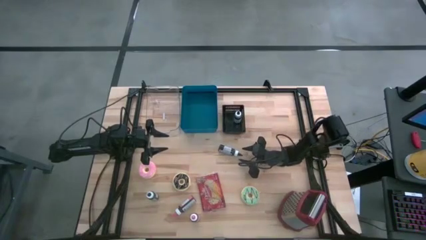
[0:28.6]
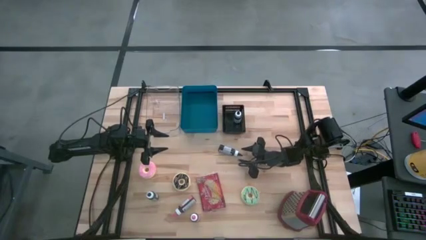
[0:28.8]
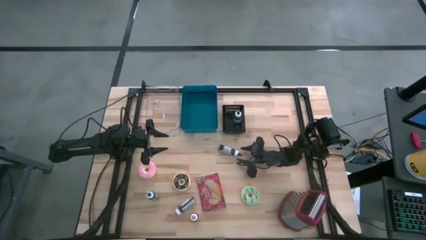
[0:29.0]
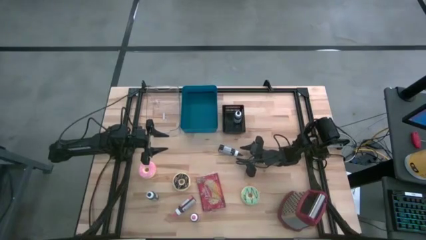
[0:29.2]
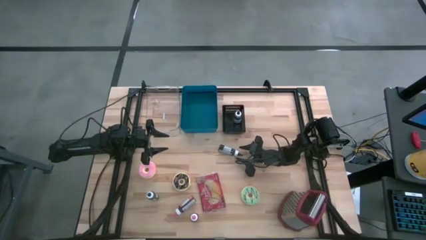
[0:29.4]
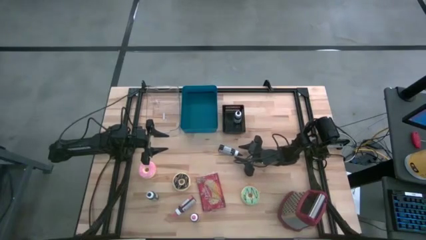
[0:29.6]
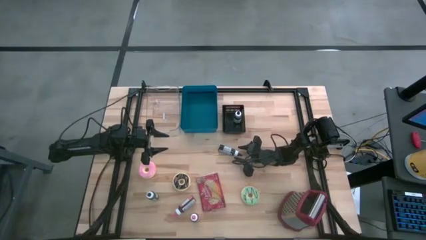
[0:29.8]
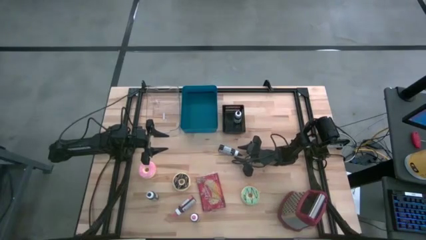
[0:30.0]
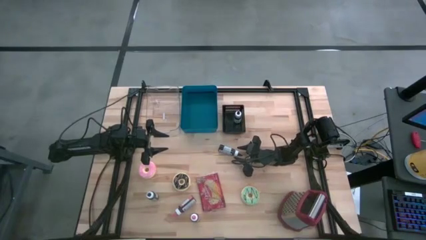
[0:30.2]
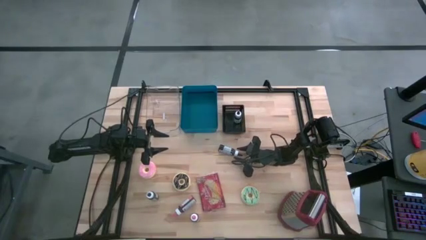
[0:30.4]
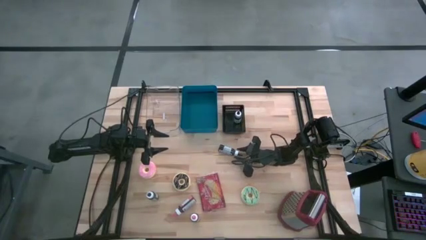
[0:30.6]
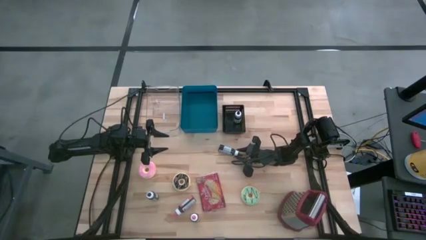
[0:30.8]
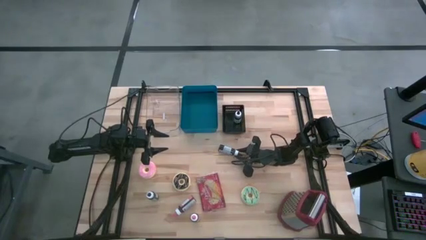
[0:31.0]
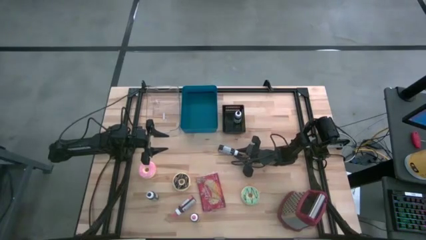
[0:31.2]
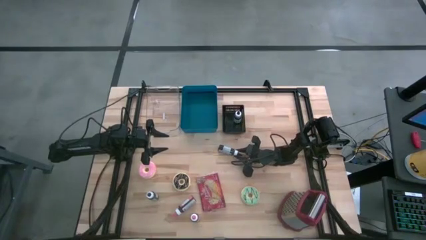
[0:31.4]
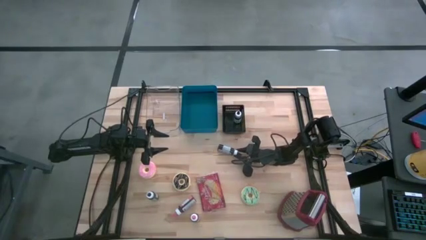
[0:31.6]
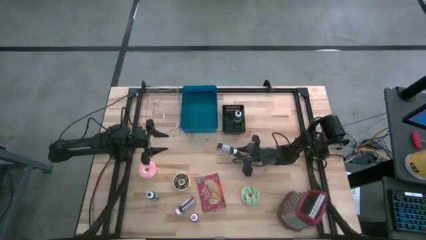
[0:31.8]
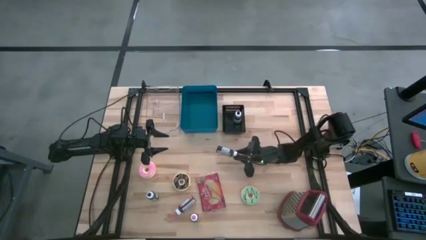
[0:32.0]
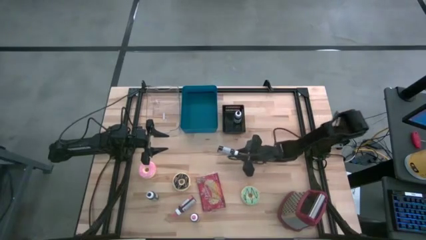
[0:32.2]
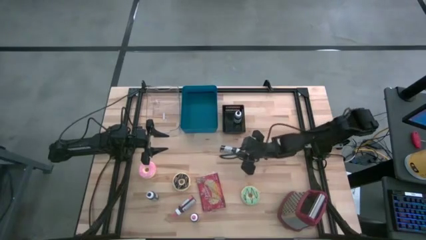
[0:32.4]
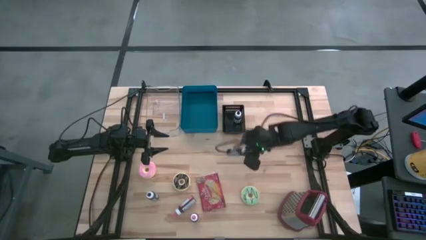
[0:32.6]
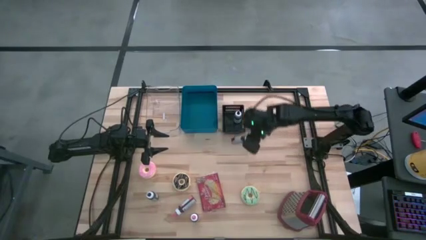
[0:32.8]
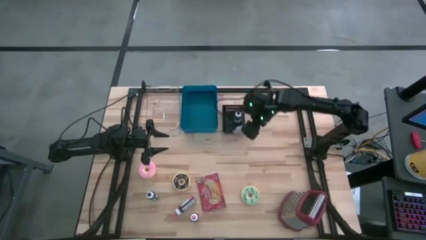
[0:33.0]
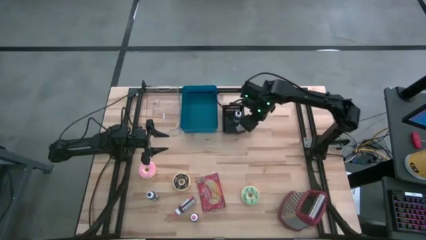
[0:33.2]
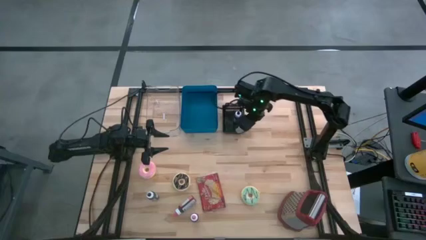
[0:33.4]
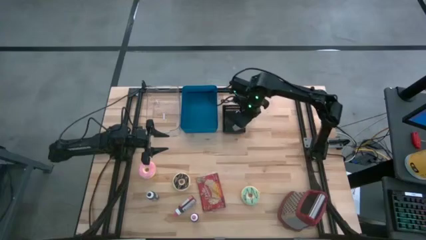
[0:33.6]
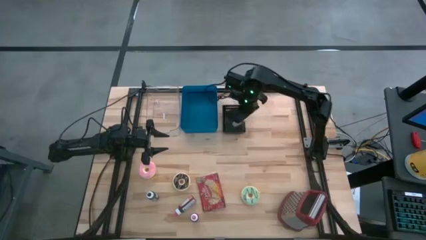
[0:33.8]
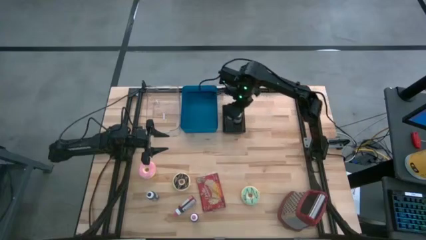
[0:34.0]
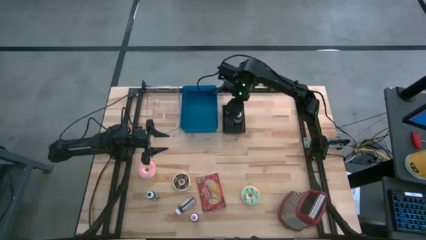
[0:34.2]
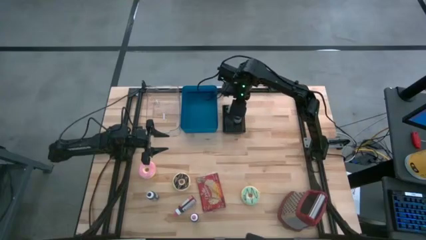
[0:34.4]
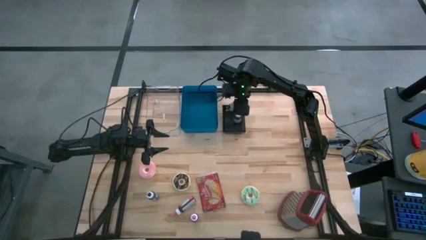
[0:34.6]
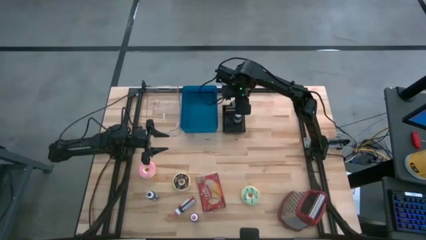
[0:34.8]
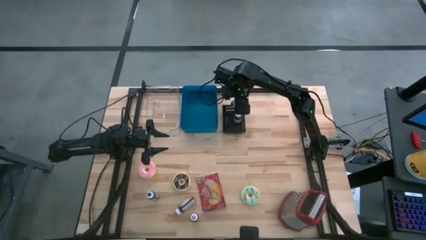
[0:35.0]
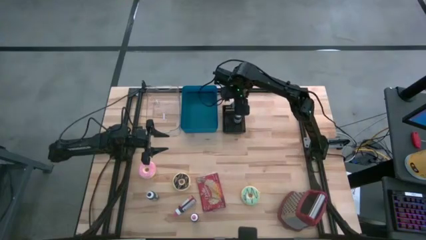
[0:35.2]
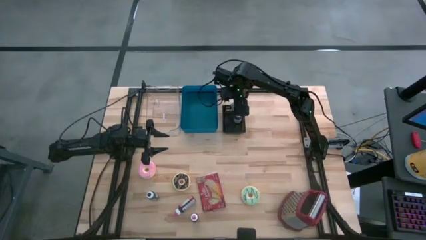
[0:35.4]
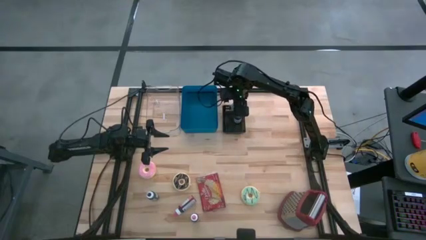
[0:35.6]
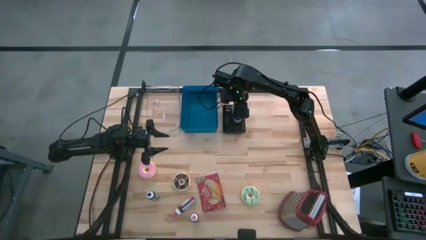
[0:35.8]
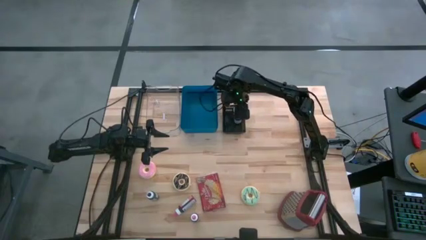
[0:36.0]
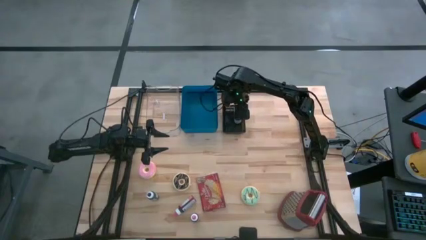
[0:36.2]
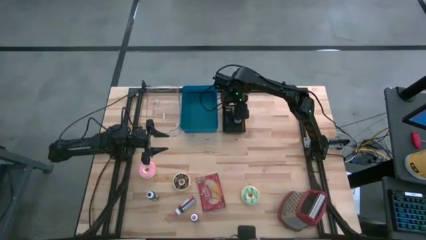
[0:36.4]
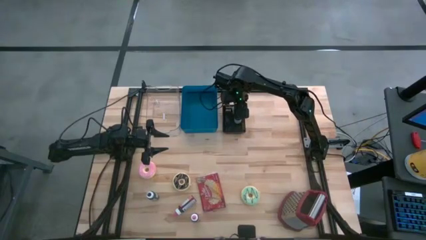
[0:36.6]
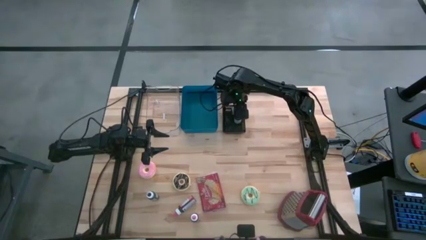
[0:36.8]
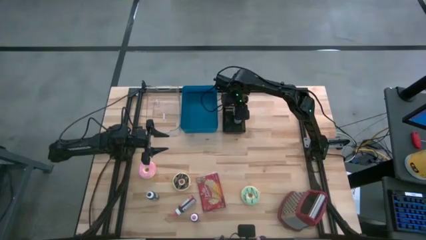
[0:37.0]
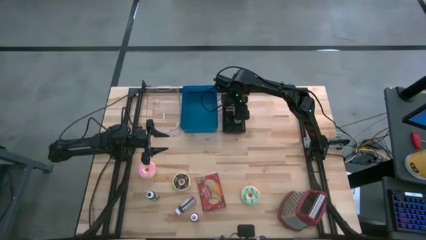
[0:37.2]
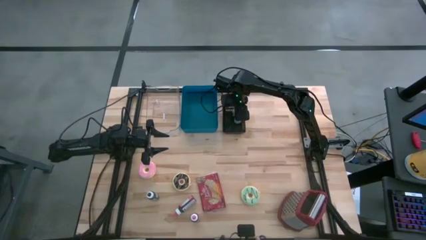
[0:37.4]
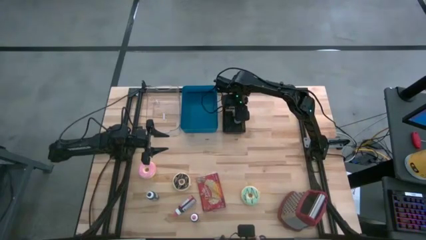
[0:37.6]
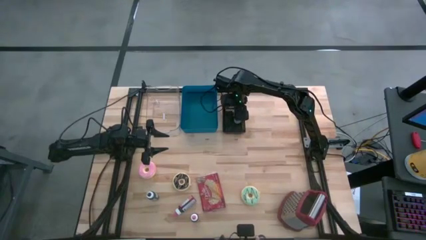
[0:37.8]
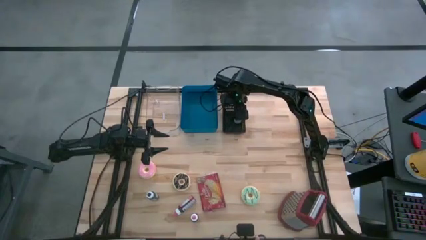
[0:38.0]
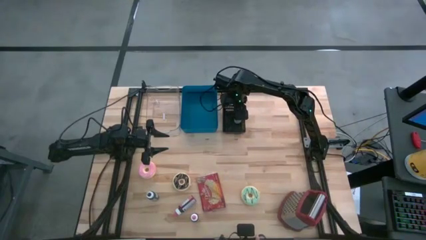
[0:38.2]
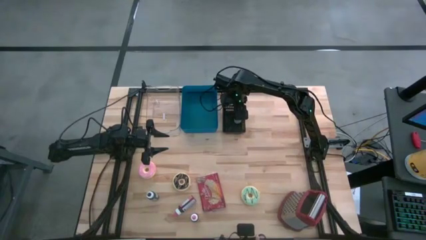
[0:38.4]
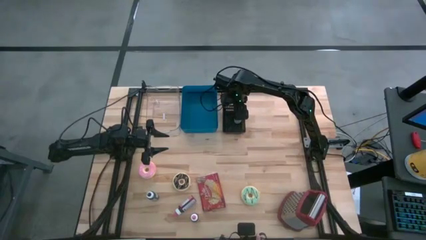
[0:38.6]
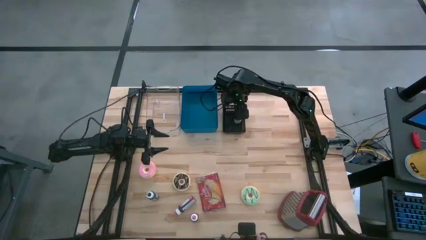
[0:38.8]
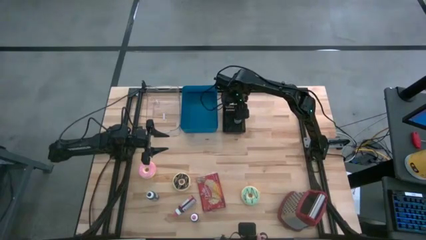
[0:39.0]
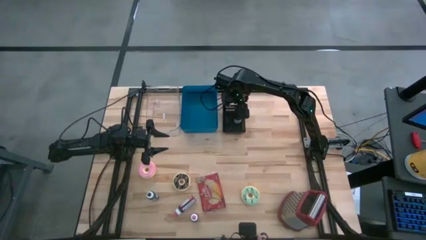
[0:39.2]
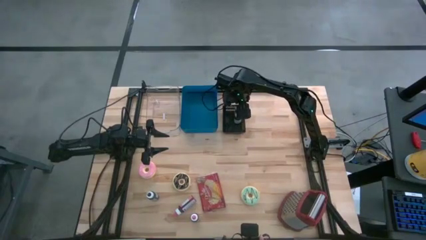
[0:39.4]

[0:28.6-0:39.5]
Put the top black food coloring into the black bin
